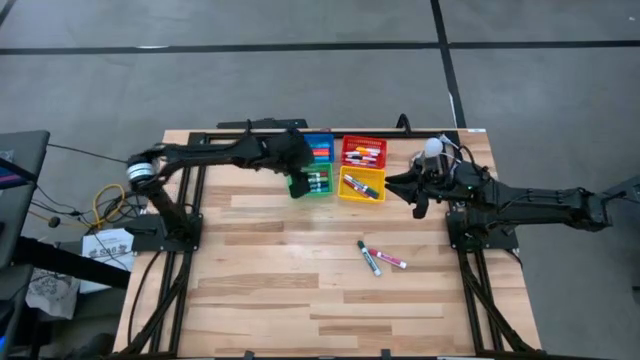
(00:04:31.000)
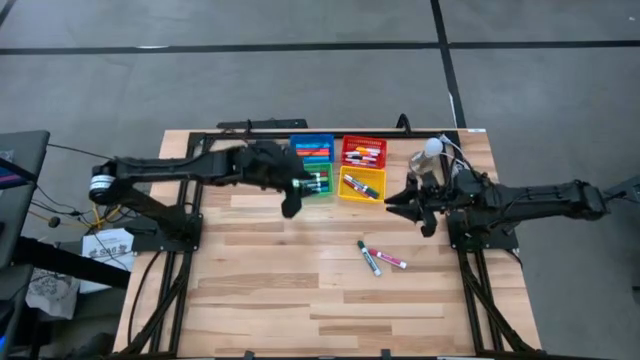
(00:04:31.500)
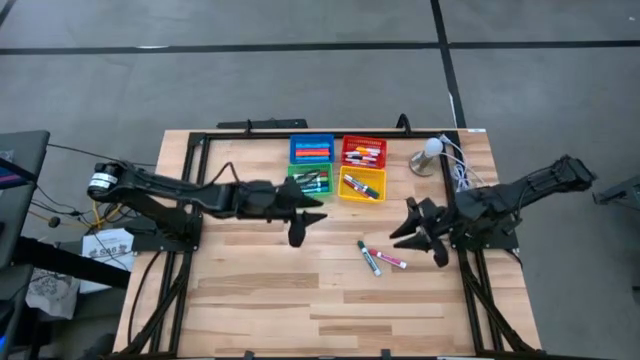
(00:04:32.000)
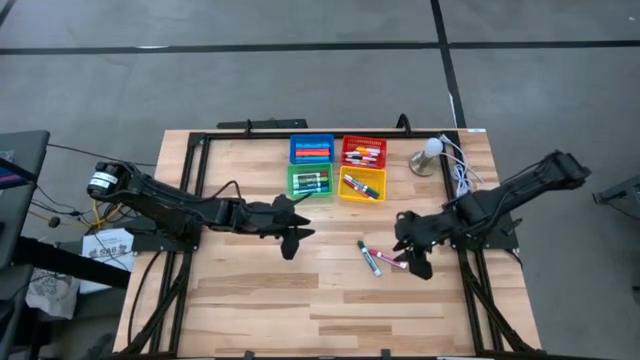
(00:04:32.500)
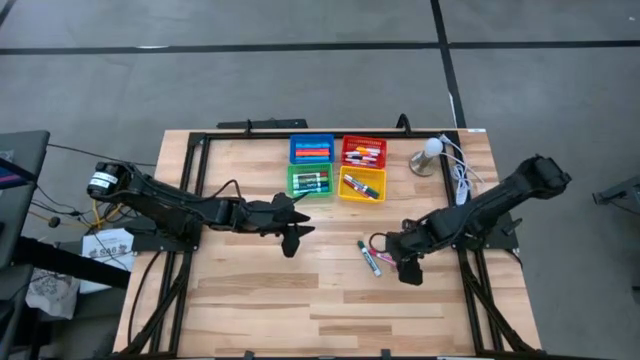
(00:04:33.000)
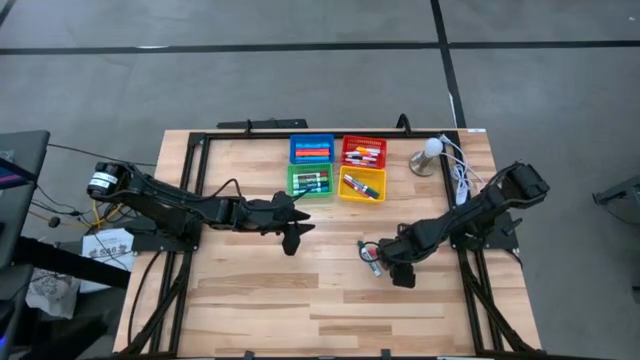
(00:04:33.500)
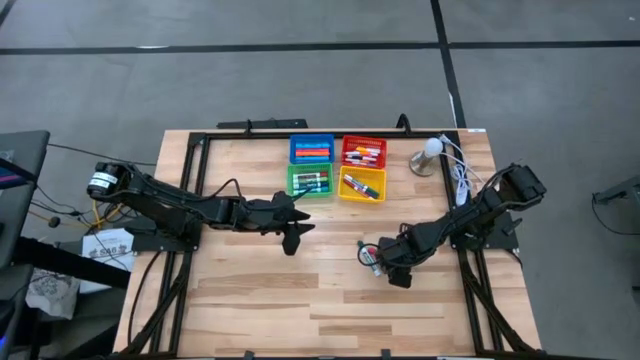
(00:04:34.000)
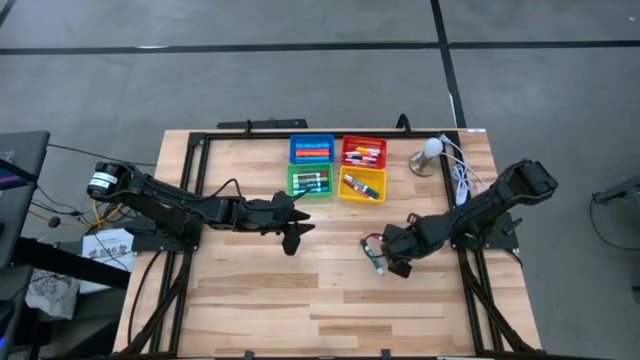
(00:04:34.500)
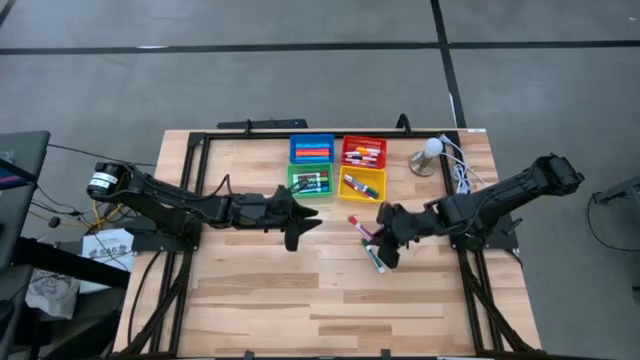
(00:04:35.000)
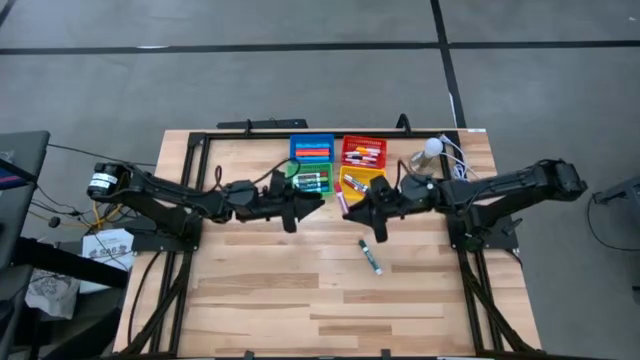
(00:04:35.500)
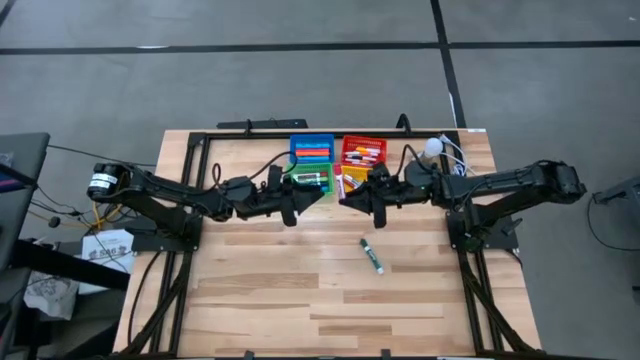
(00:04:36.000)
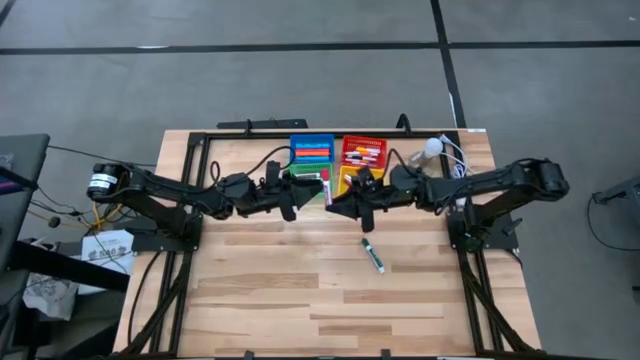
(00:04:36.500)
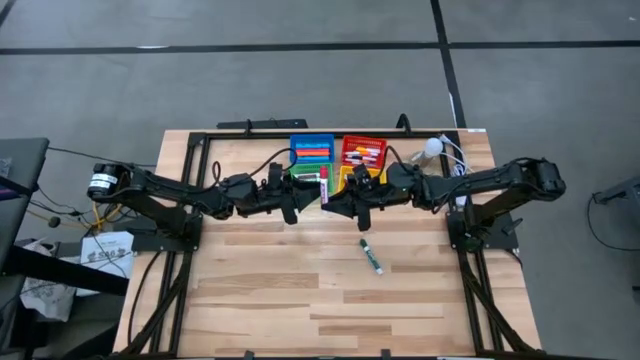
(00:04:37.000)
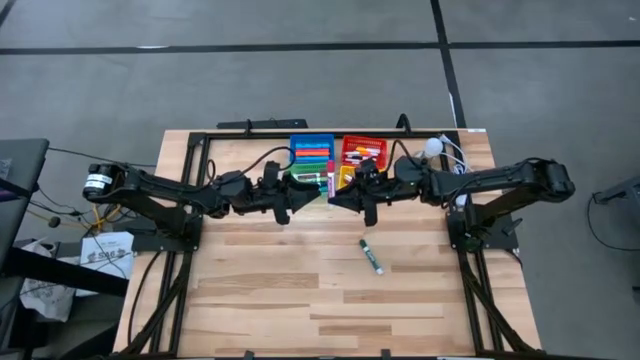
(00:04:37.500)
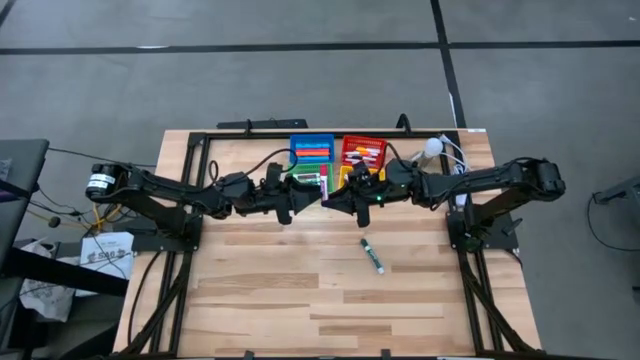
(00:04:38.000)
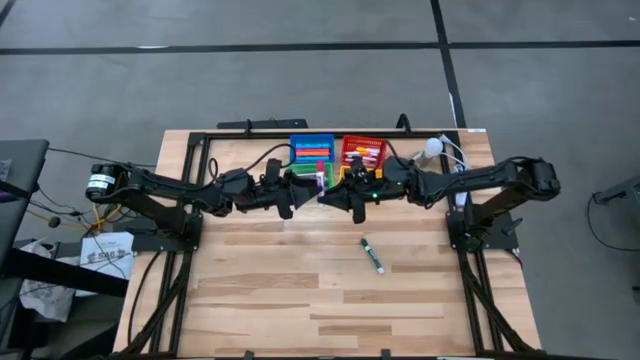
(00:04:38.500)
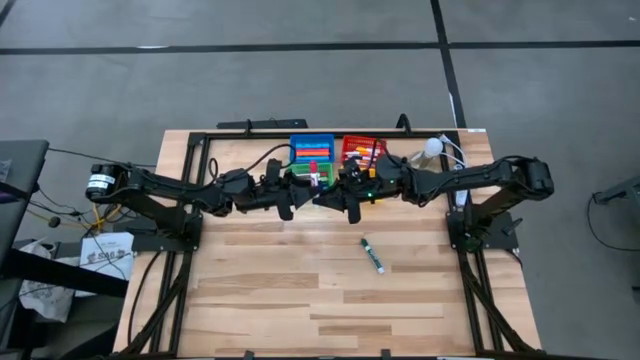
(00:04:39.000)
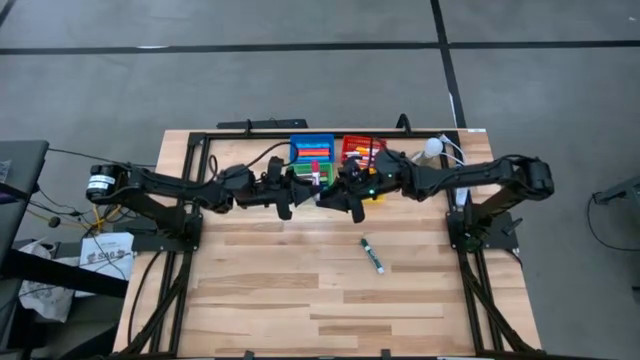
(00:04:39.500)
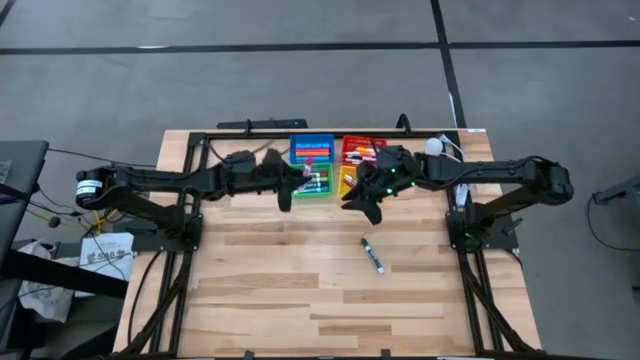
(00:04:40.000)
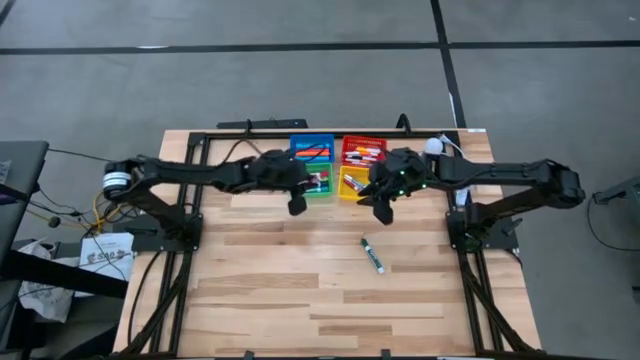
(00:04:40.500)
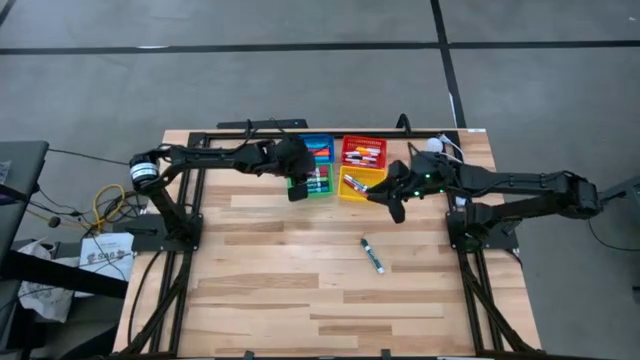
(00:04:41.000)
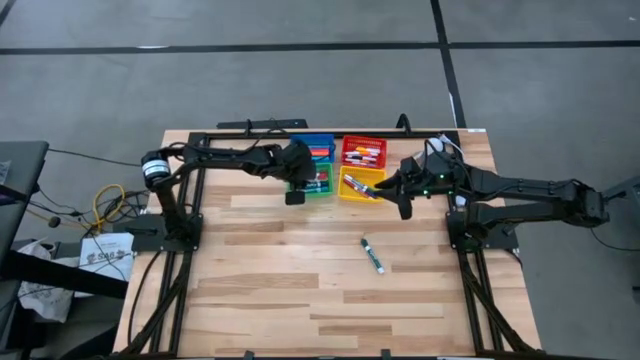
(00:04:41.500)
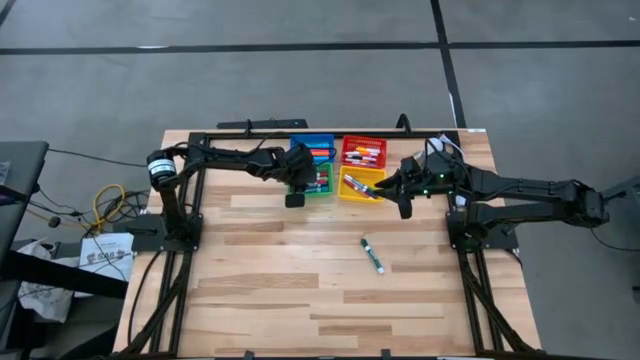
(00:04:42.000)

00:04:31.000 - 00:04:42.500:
Task: Pick & Place Markers
Put the white and pink marker into the green bin

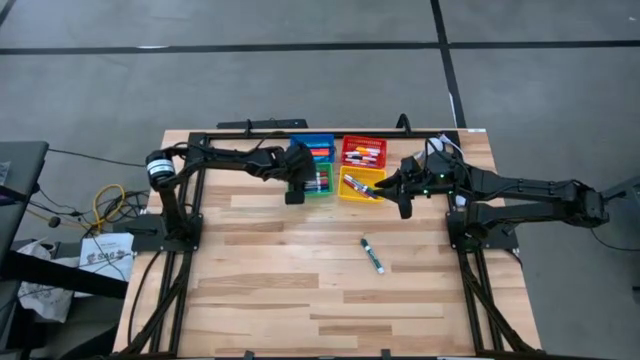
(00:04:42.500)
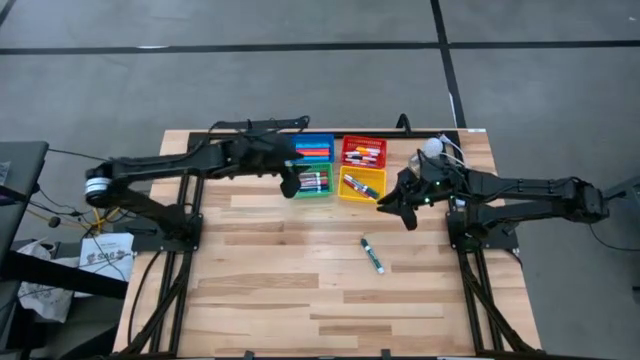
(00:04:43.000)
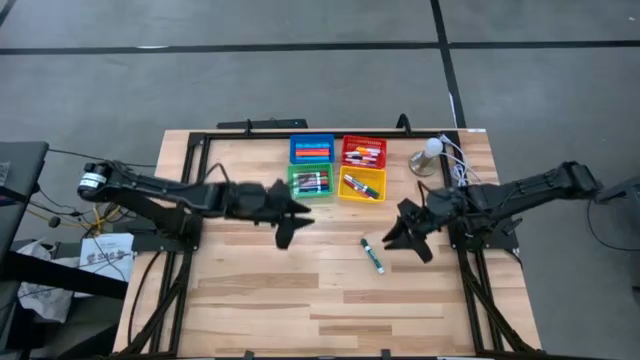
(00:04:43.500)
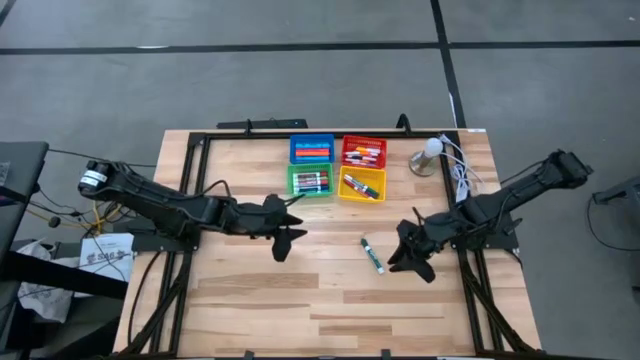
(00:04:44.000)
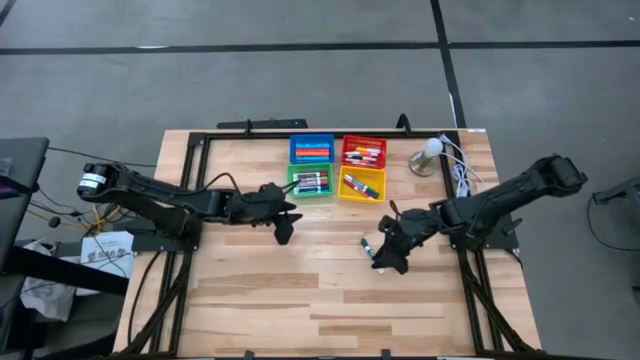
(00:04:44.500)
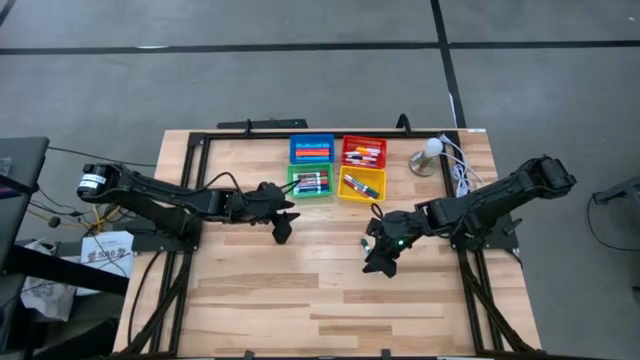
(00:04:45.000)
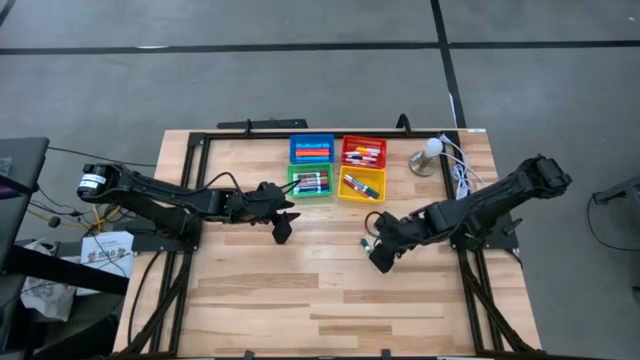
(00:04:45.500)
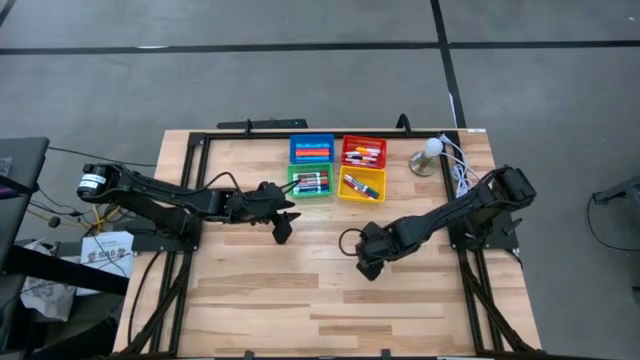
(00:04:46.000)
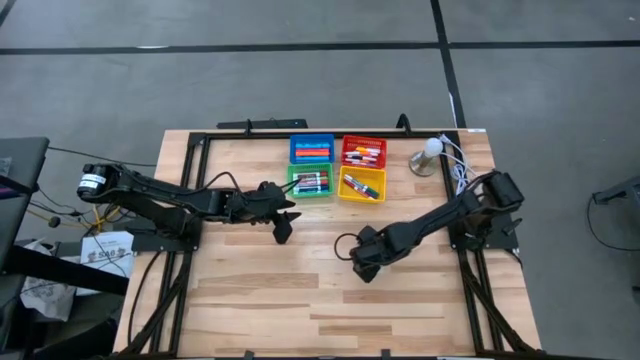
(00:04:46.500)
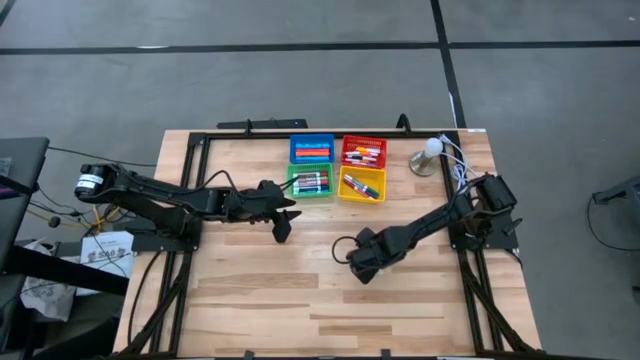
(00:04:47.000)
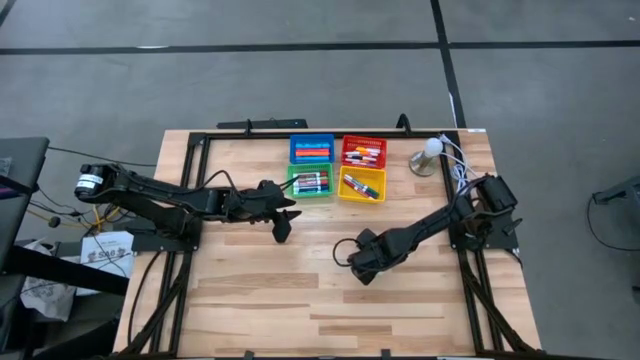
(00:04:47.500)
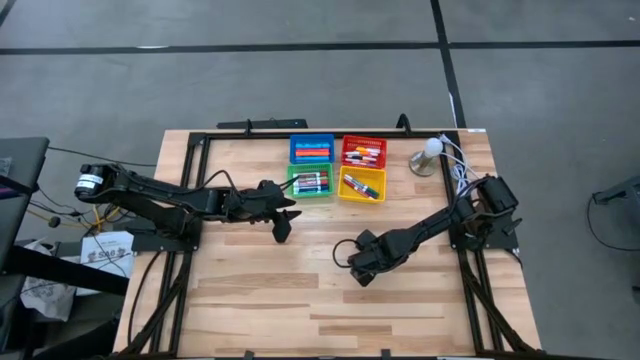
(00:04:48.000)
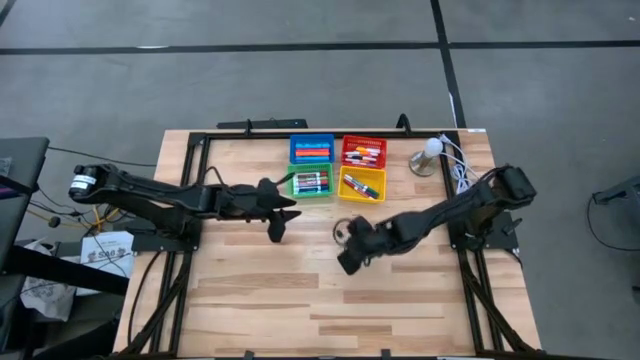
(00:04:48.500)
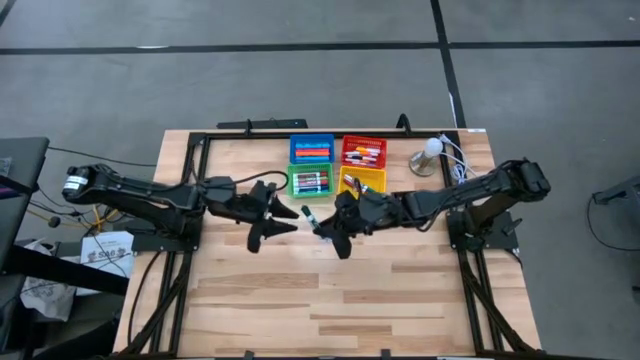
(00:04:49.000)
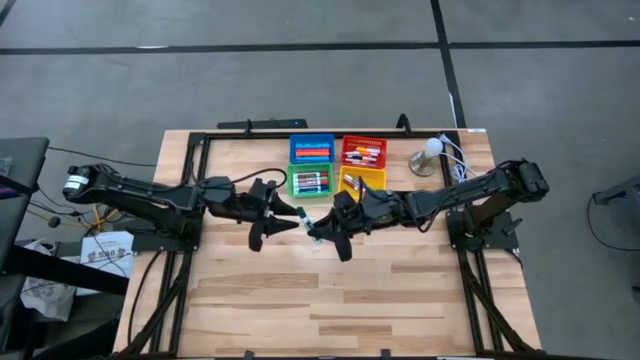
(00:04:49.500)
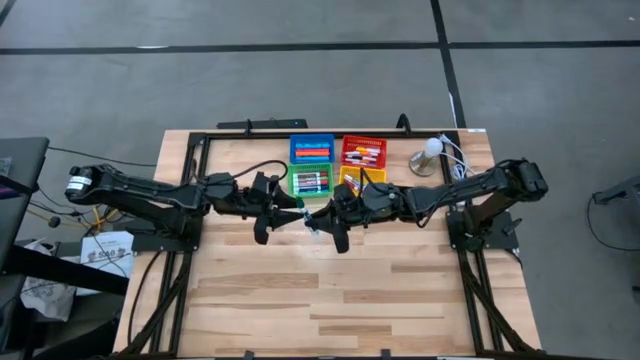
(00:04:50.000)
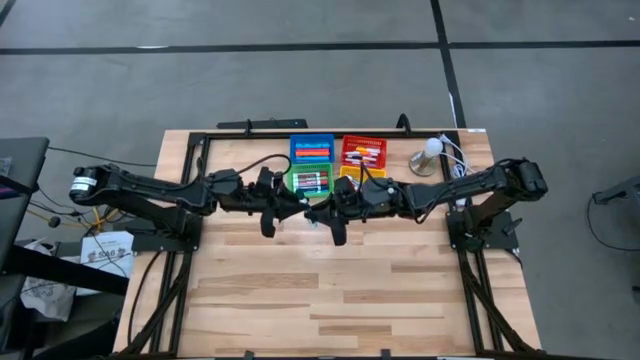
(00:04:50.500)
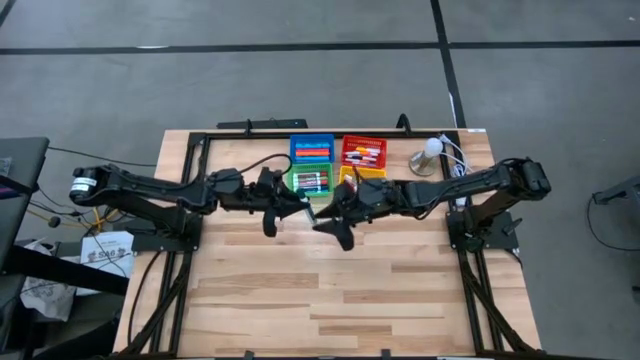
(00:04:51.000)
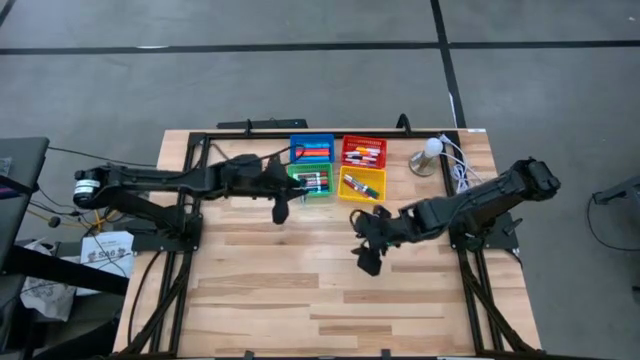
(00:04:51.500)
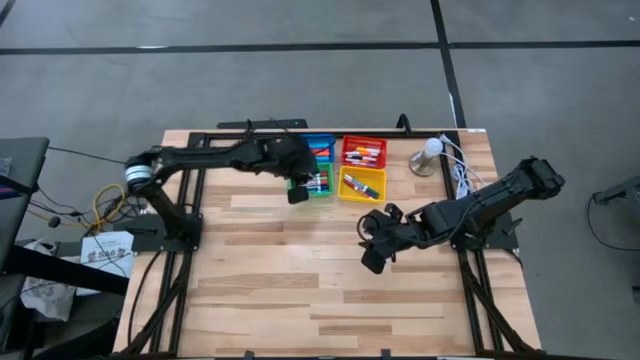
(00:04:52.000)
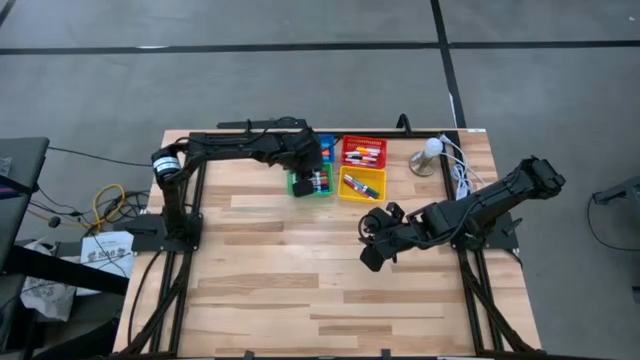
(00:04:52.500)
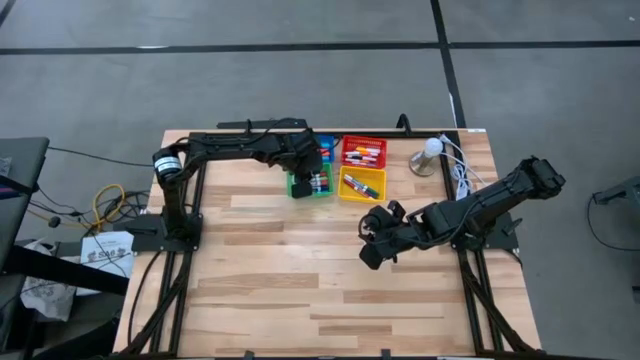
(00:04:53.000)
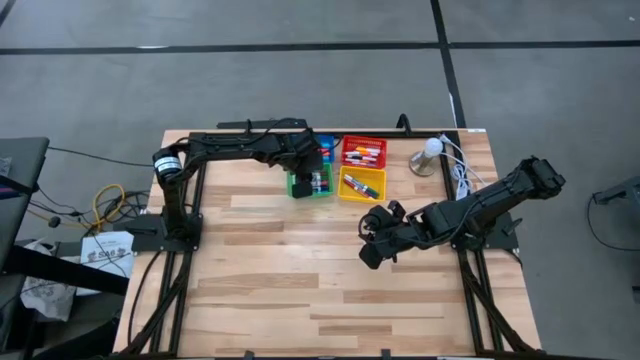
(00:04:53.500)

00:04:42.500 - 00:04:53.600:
Put the white and green marker into the green bin
